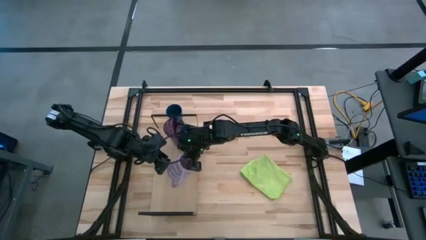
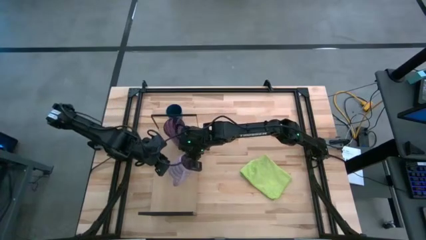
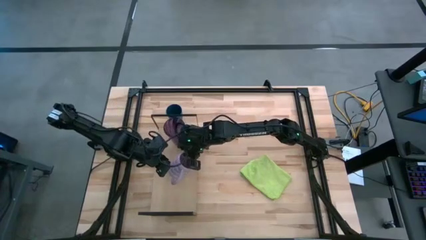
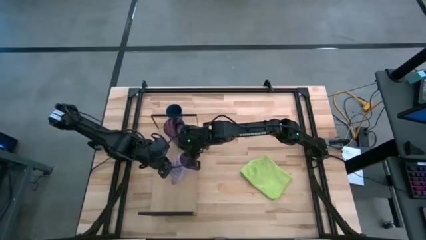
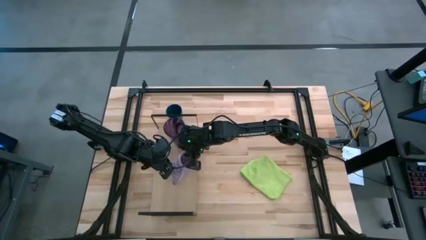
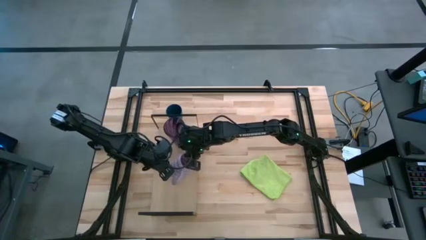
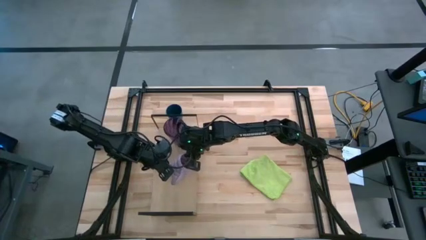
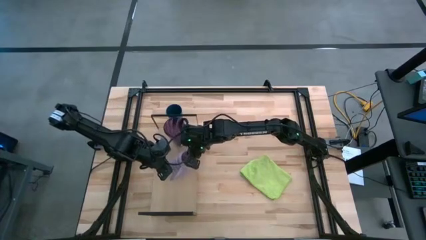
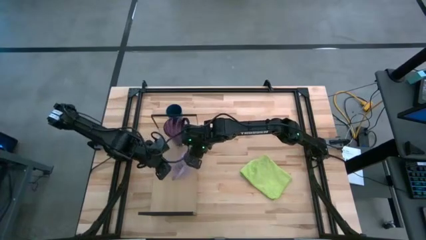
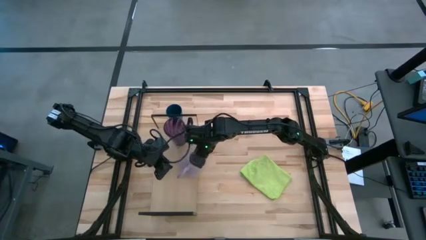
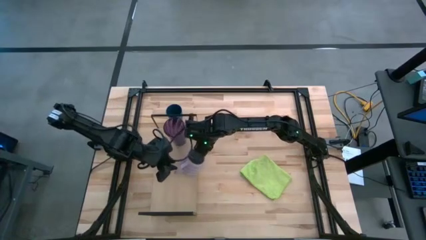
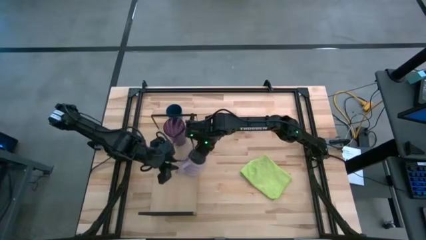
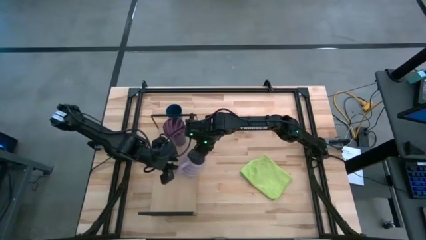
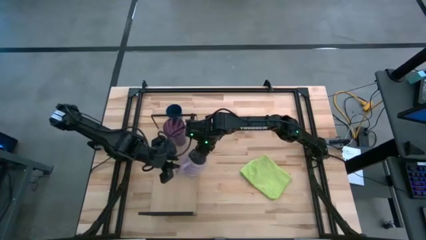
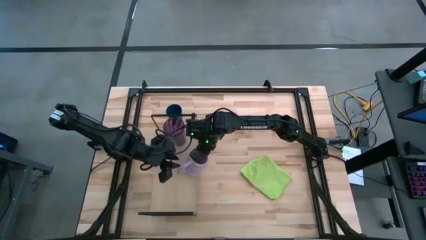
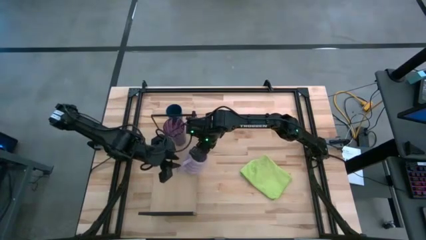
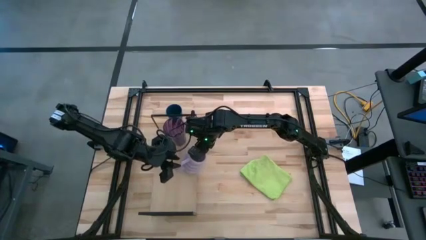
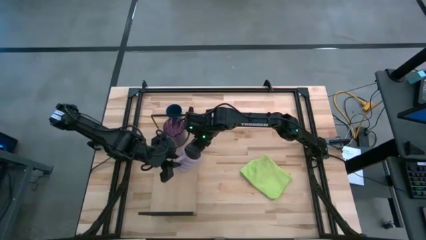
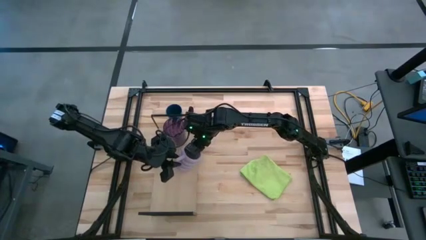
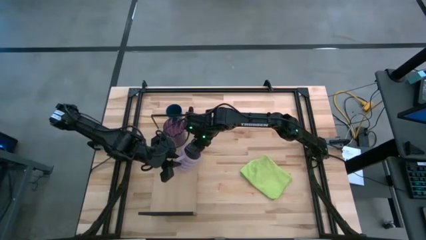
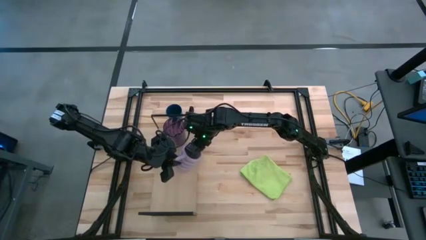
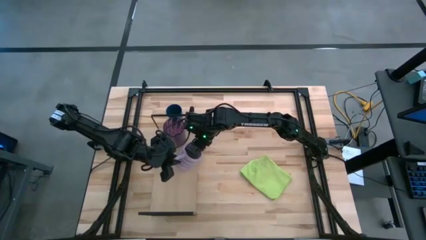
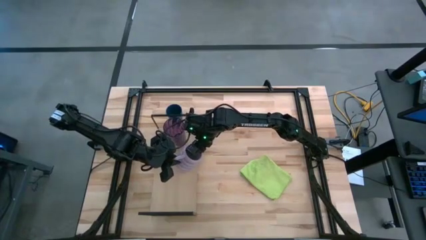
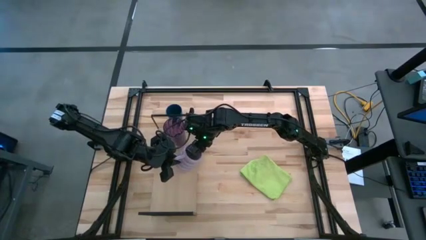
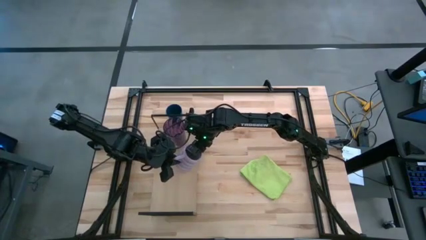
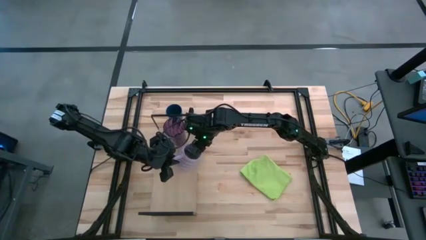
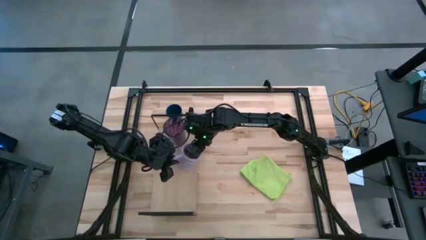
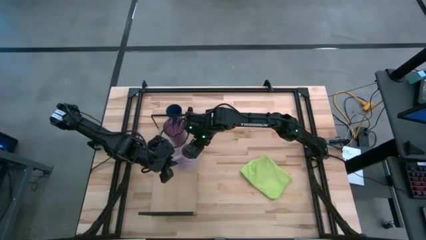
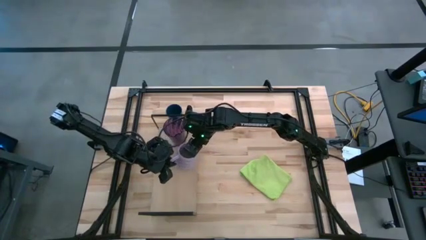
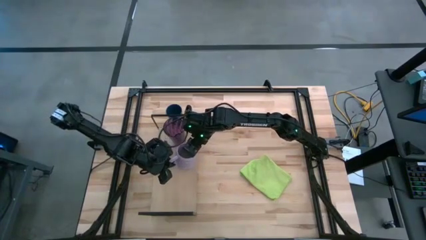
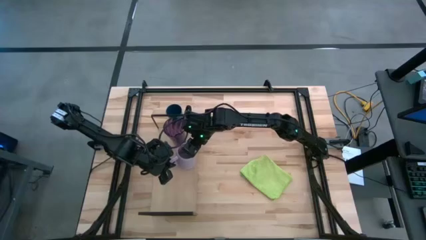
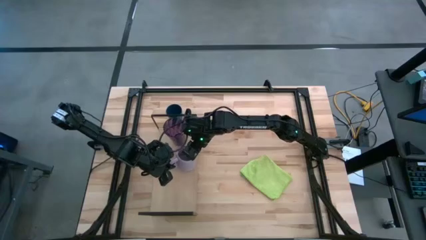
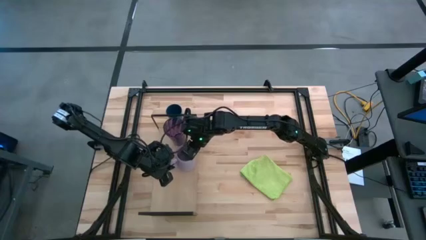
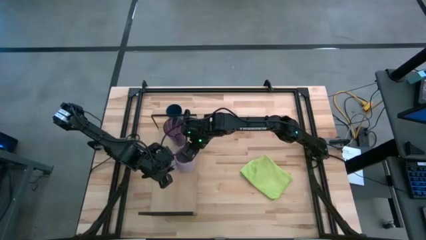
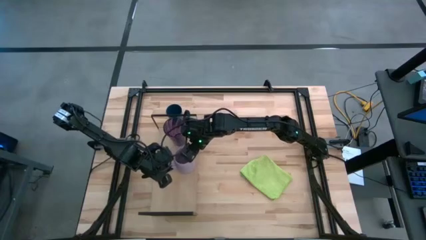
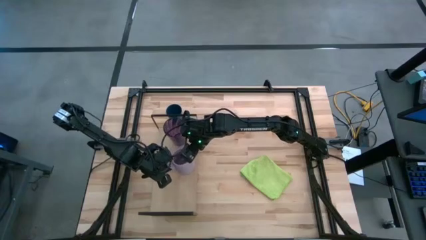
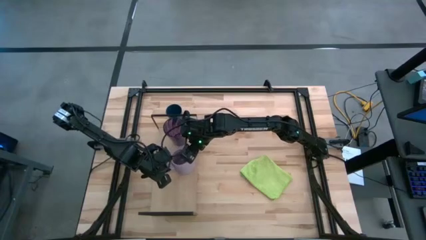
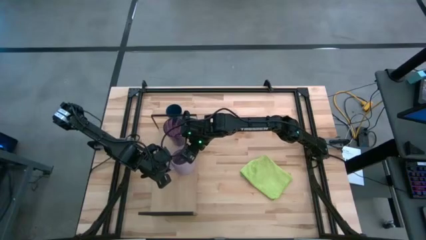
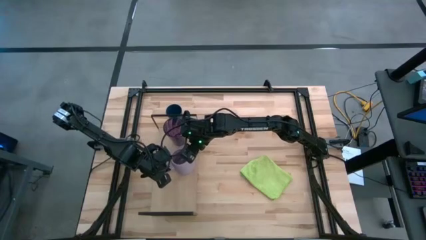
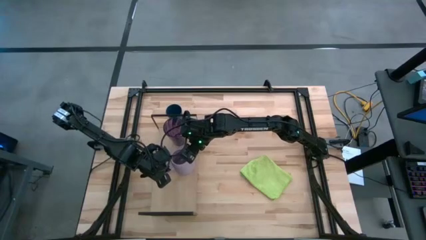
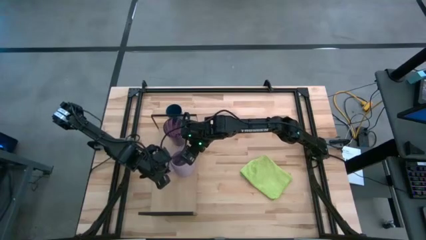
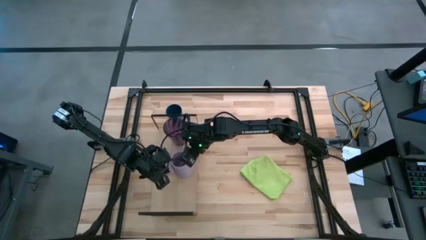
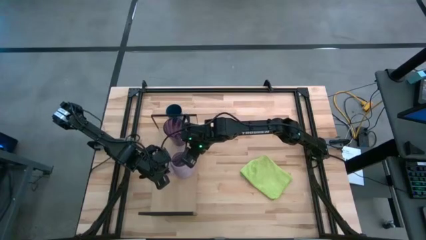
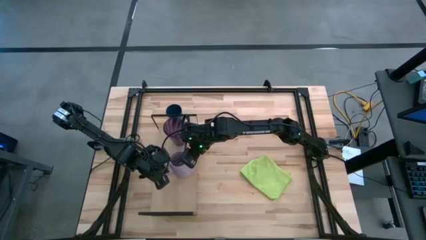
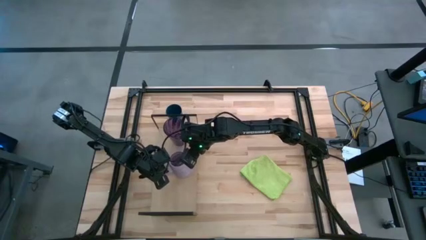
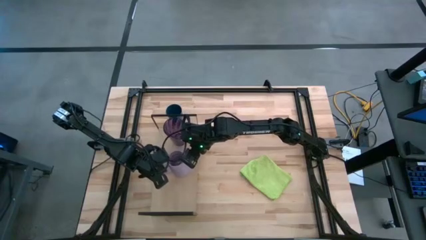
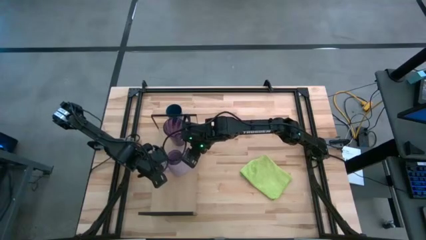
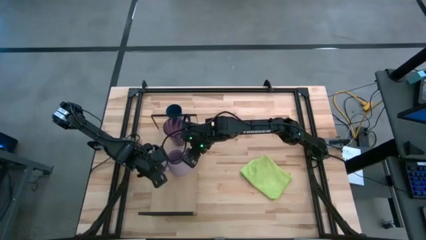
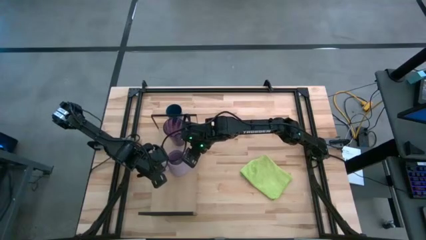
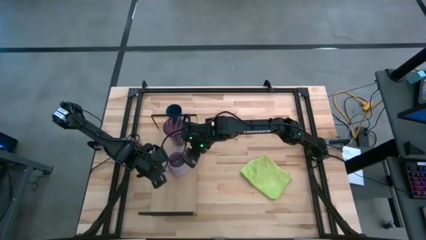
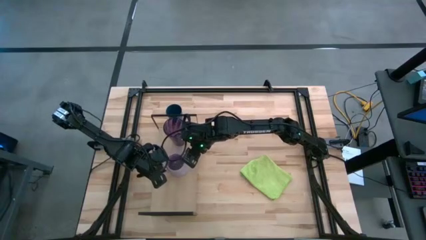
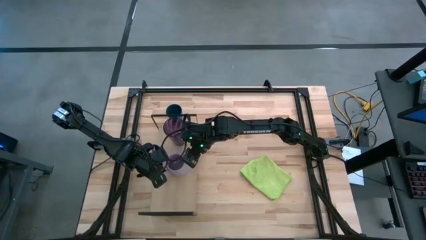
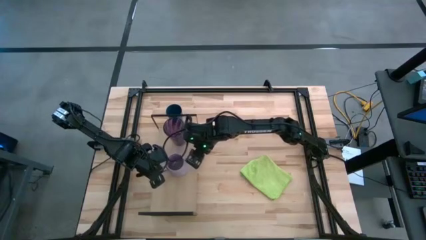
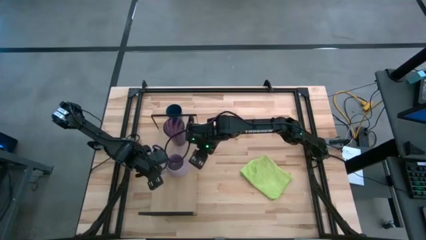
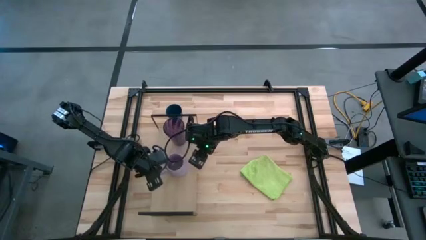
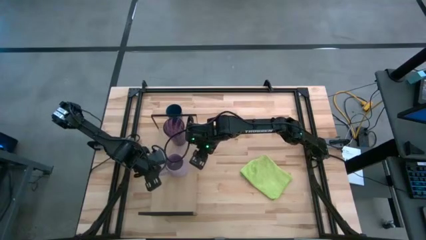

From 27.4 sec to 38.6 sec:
Task: Stack small to large cups/mugs on shelf
Put purple mug on the shelf
